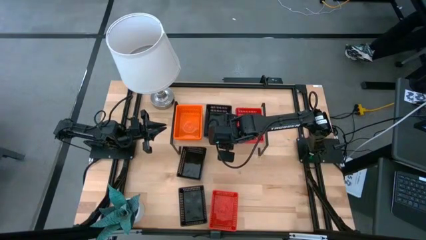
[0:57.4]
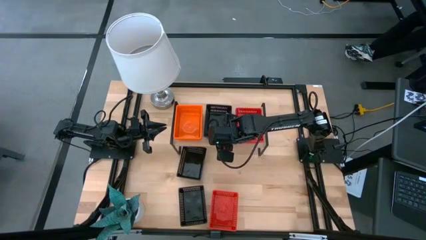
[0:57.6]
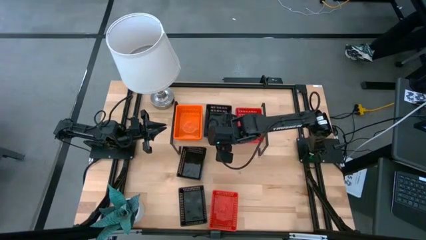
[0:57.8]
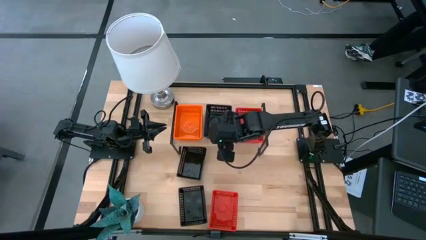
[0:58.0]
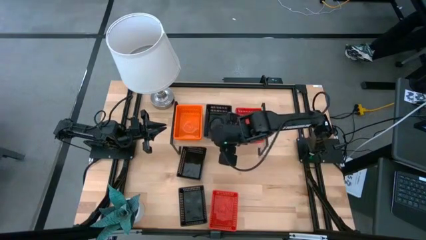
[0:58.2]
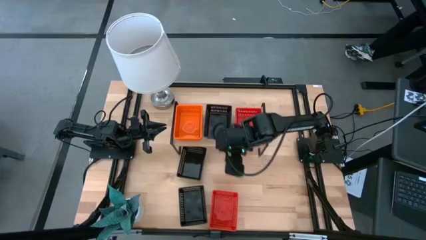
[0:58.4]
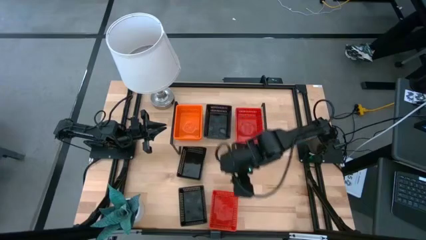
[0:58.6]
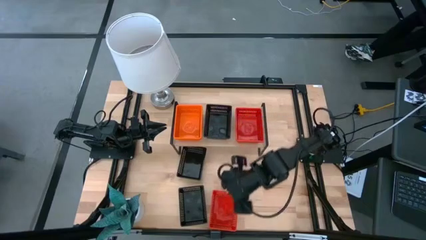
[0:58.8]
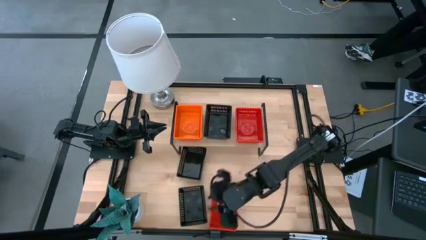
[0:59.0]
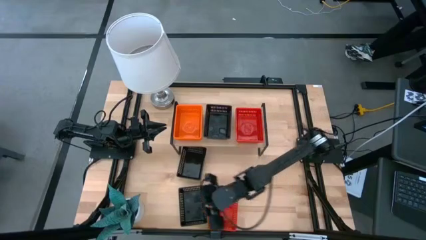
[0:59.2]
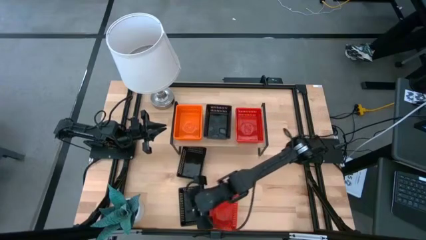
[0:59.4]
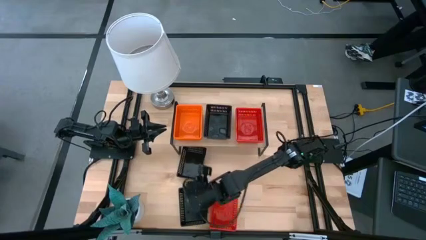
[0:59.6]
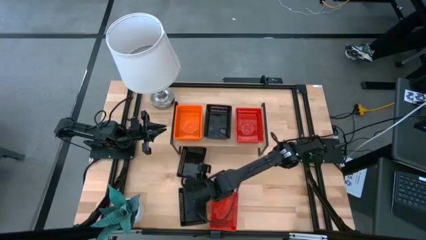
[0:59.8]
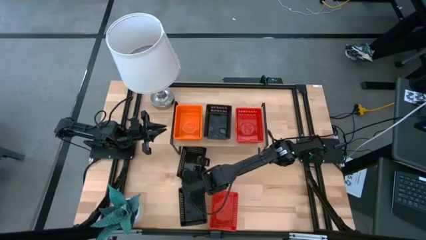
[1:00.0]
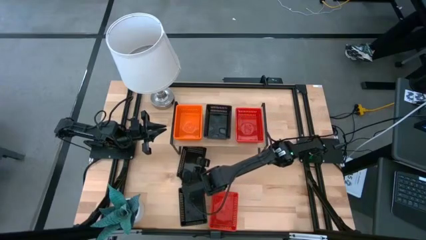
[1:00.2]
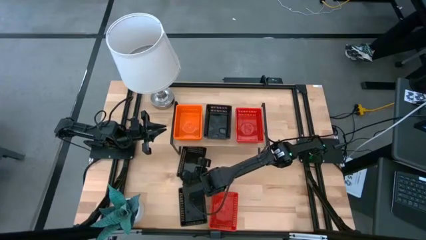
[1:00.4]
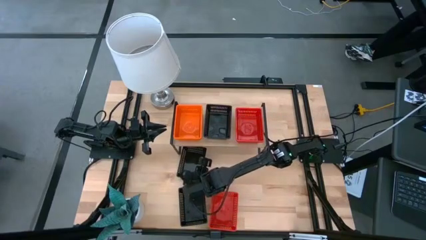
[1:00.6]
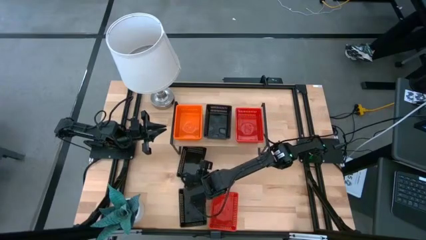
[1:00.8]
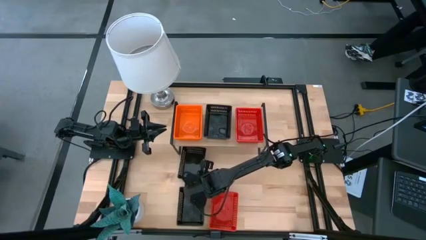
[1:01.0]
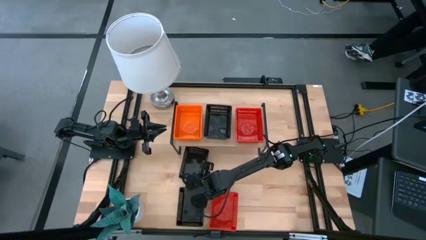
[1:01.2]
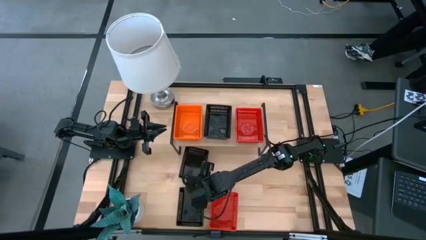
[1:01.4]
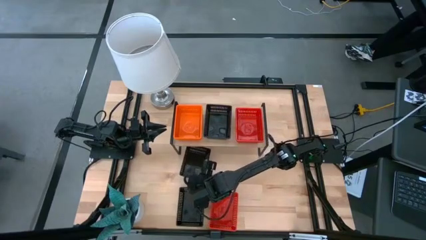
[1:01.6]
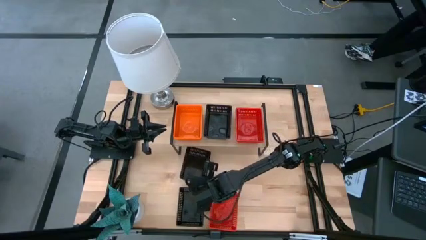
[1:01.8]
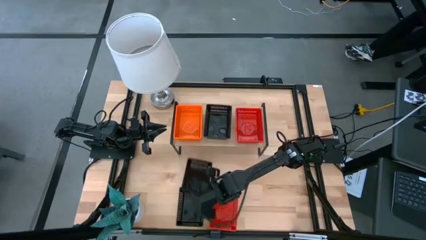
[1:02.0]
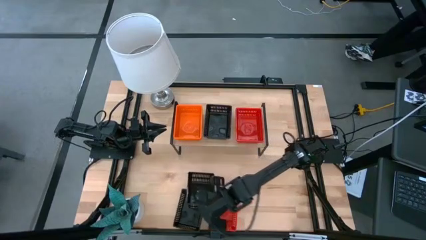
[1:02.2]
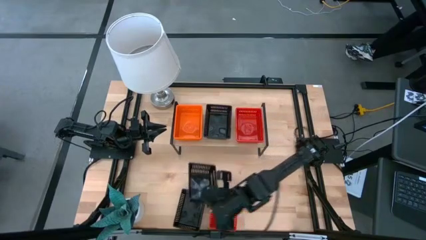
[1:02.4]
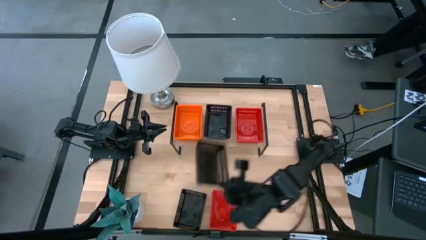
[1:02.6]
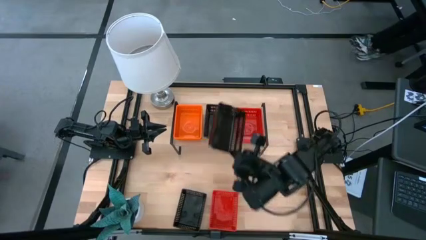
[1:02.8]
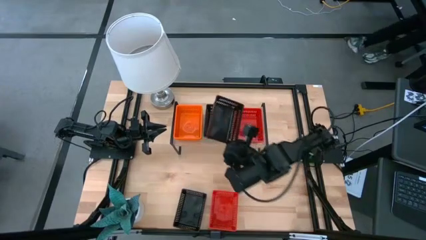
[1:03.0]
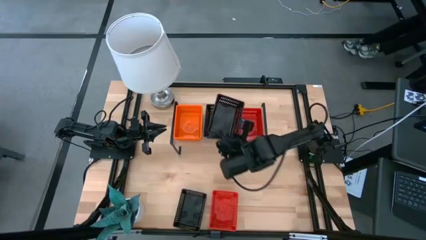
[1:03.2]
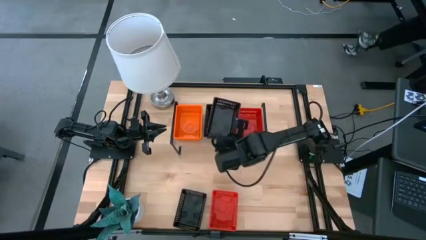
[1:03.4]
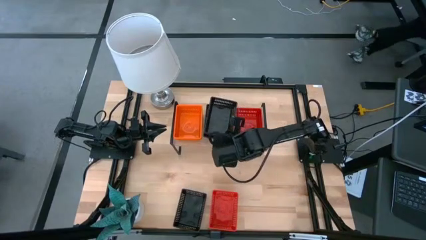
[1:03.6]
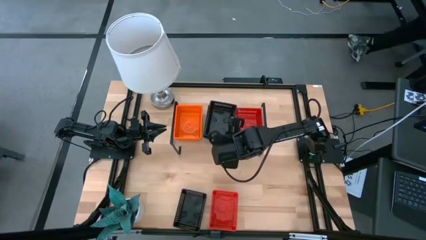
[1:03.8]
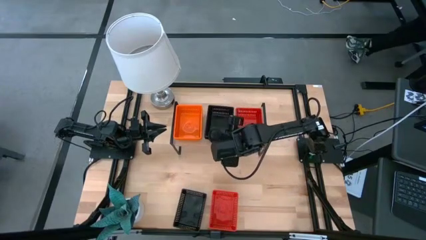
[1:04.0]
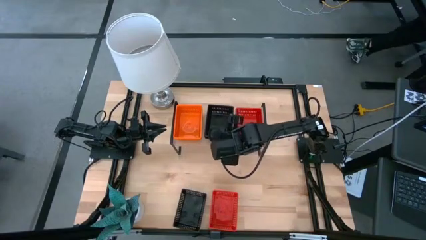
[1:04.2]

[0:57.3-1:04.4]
Task: Stack baskets on shelf by color
Stack the top black bin on top of the black bin on the shelf

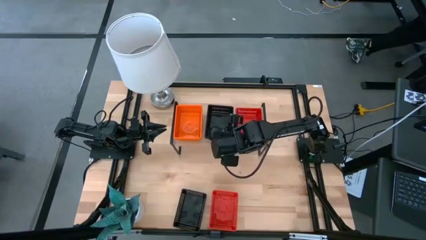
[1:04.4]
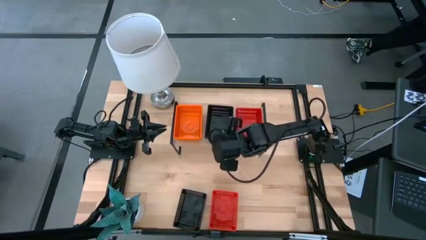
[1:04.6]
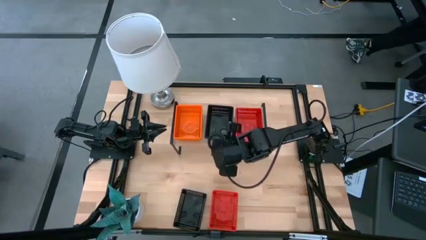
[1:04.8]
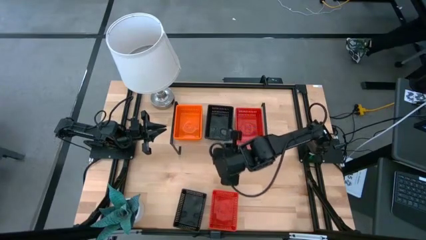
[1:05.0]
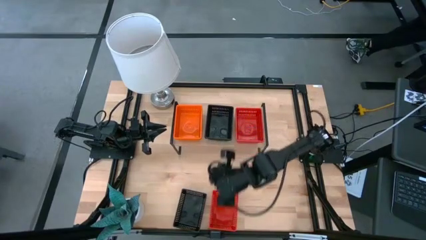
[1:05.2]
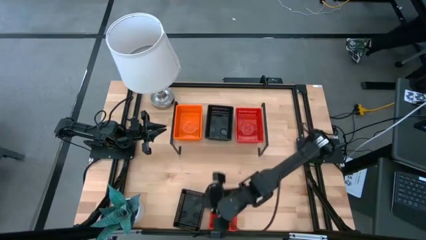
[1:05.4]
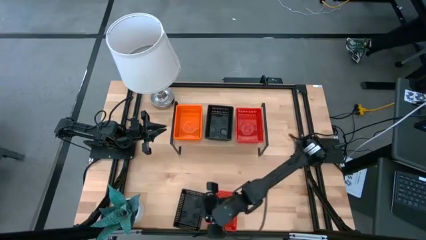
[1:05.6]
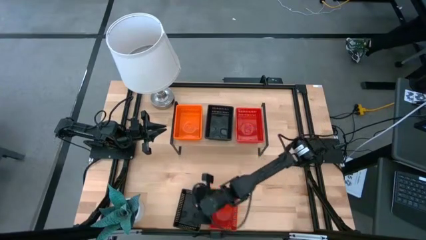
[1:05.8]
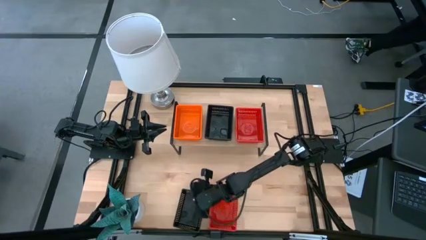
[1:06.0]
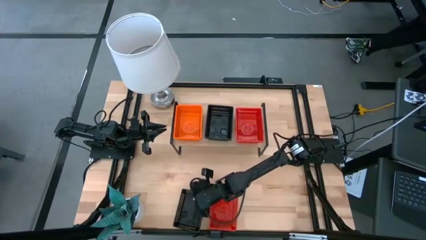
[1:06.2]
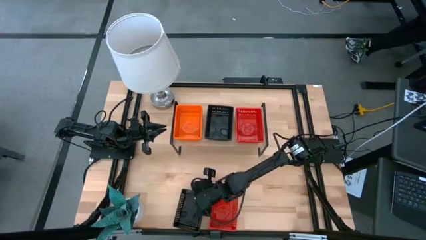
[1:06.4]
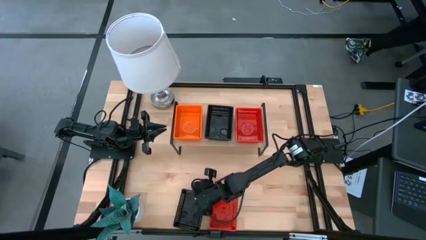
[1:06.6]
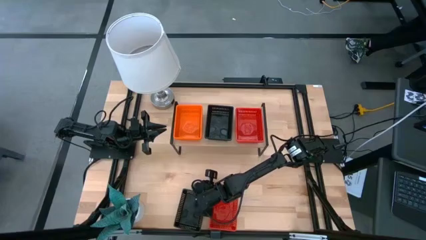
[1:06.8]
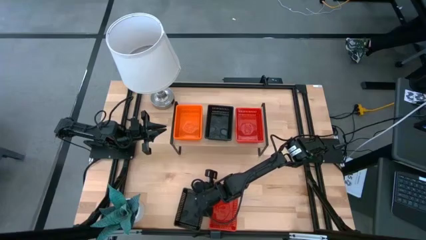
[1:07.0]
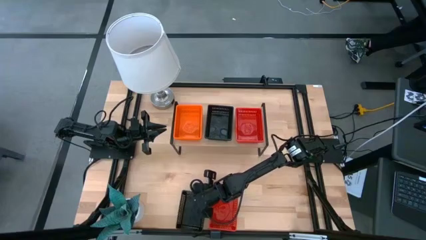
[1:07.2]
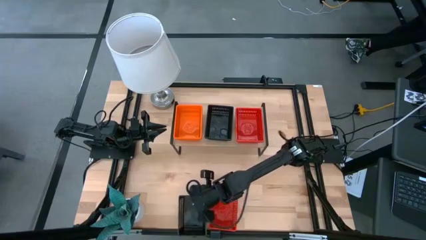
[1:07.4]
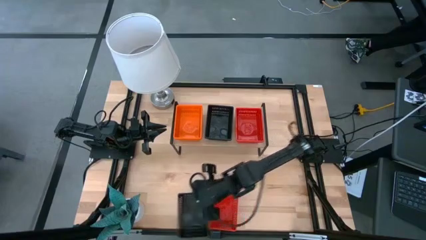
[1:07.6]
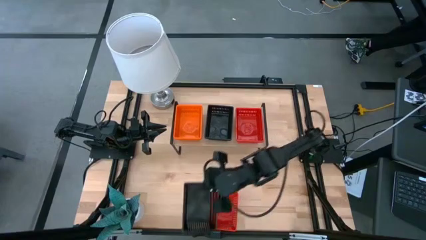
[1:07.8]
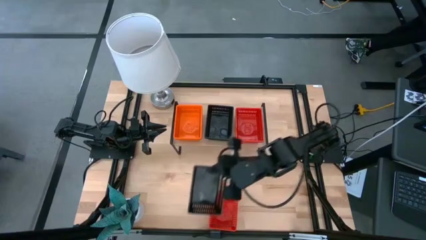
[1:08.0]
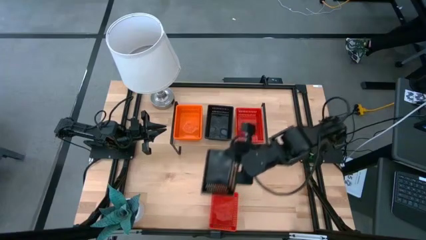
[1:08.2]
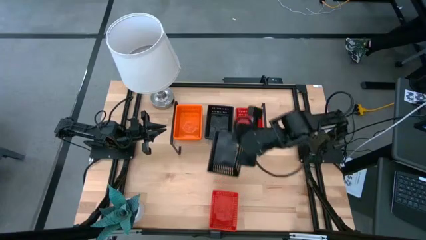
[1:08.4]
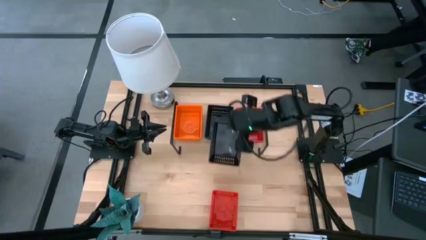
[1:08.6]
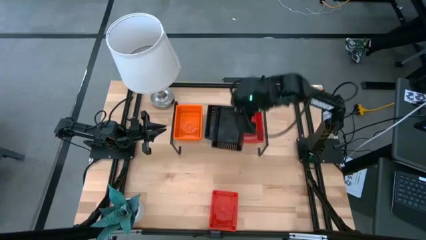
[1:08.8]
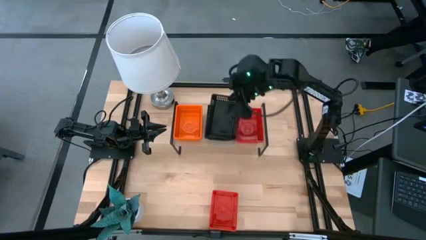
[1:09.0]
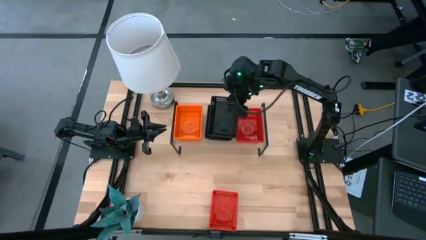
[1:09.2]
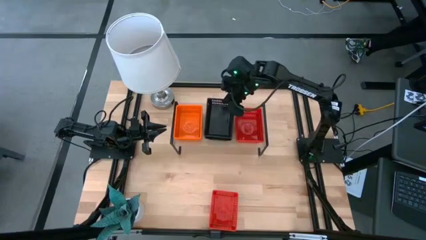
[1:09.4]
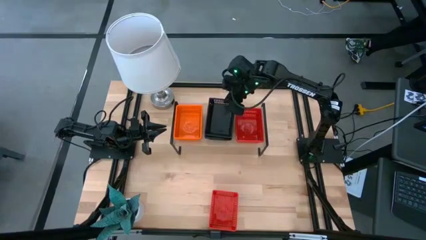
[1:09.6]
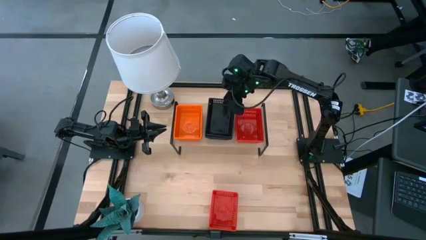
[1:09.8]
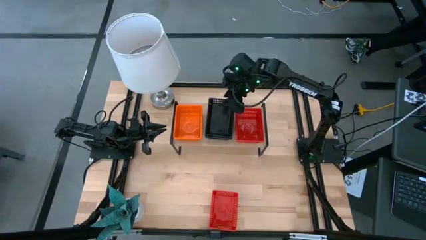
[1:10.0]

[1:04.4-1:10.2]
Stack the black bin on top of the black bin on the shelf

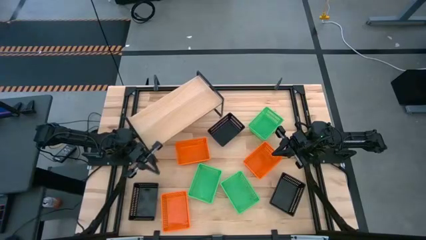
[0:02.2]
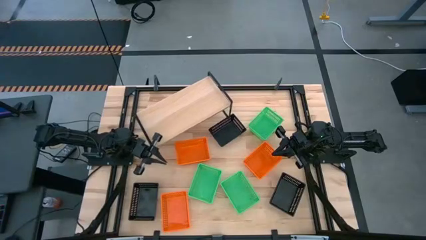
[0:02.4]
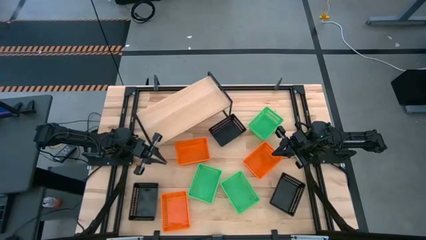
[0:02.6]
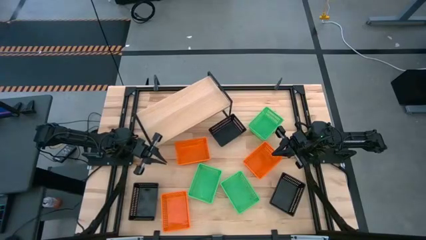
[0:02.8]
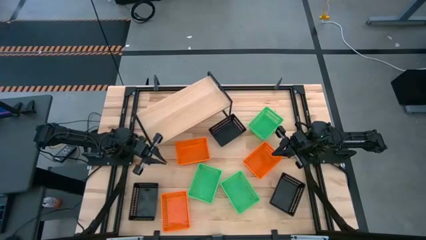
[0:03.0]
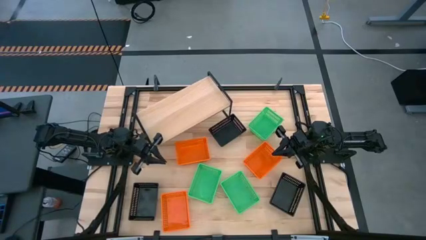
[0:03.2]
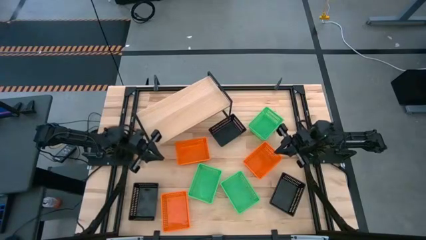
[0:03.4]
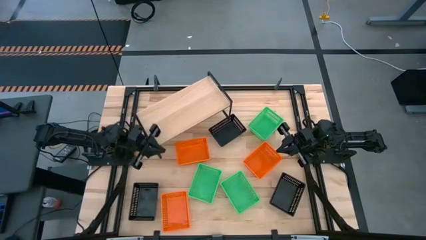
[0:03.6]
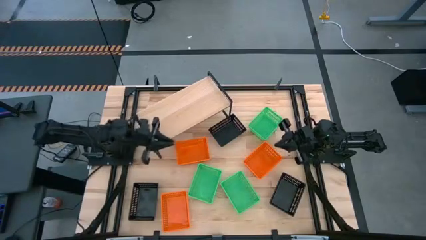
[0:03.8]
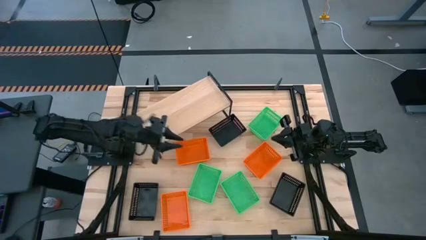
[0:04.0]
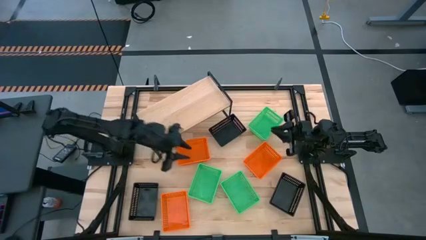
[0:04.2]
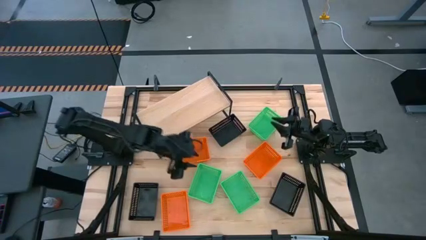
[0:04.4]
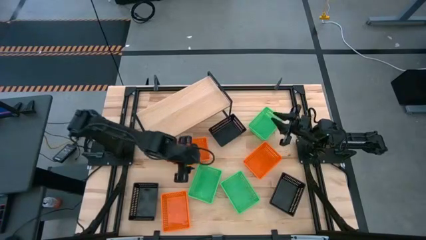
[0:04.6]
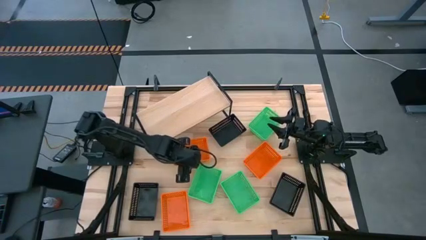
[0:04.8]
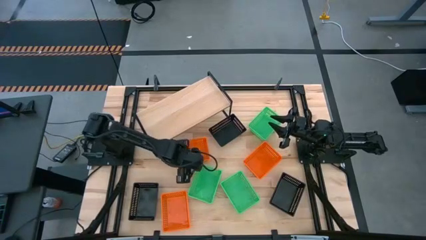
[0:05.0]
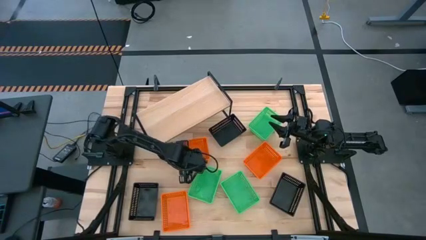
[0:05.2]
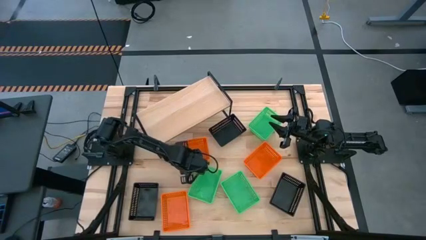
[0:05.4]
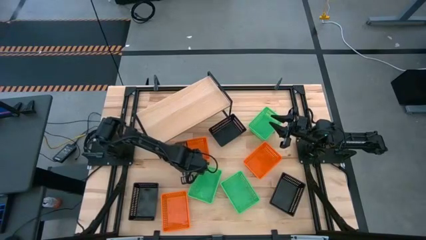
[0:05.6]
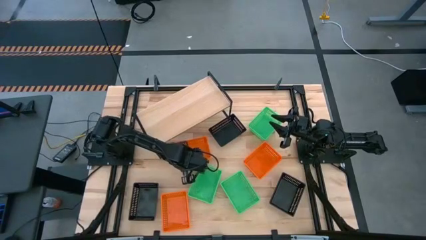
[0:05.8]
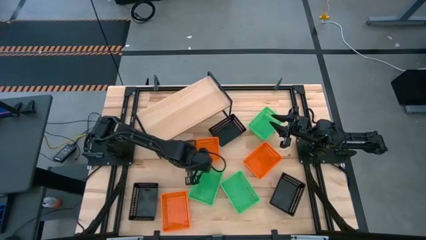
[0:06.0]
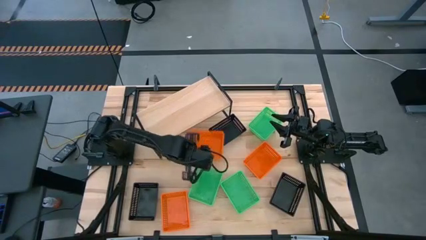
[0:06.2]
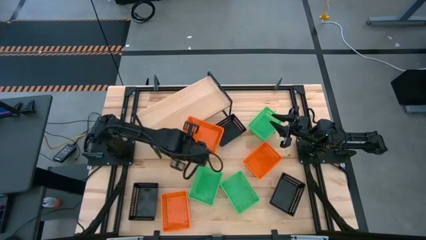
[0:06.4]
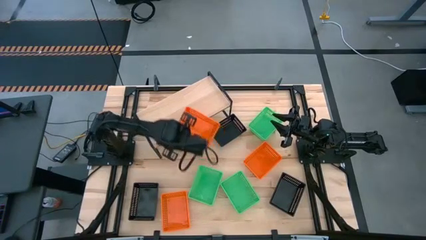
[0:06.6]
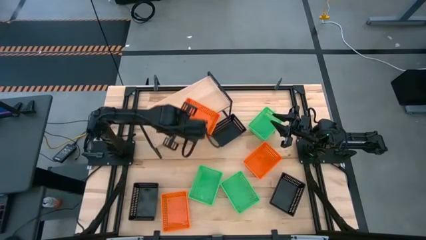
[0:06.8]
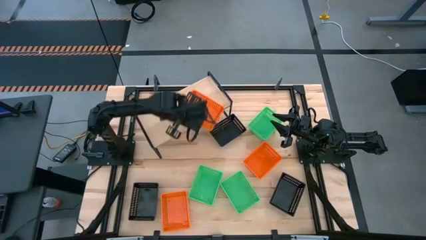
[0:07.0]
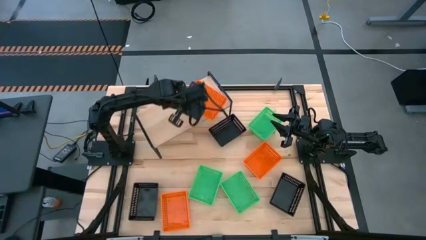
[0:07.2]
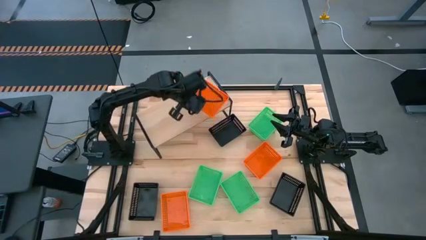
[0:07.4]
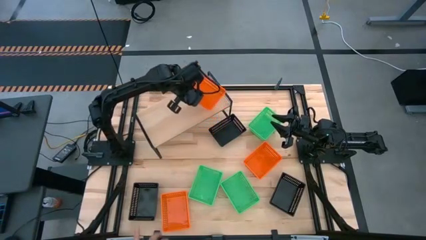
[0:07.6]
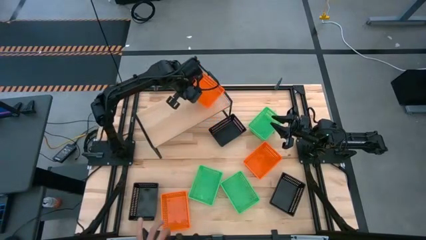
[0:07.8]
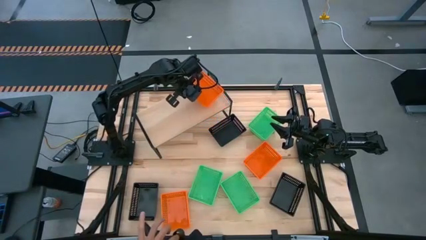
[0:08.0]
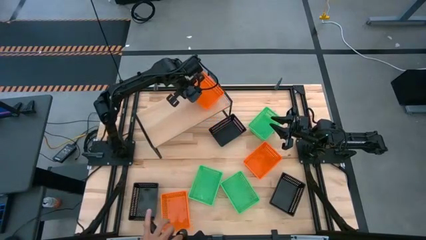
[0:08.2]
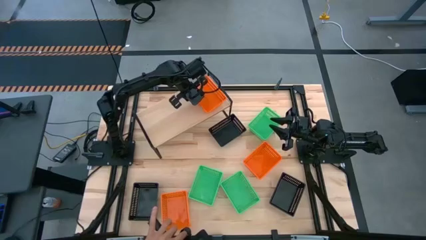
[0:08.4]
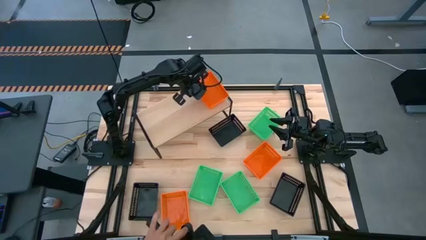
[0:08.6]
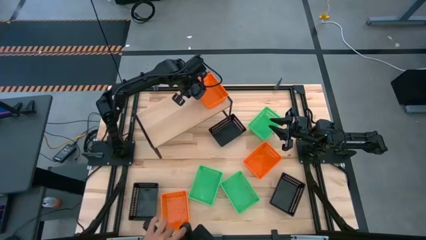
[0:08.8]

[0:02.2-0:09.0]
Task: Stack baskets on shelf by color
Put the top left orange basket on the shelf
